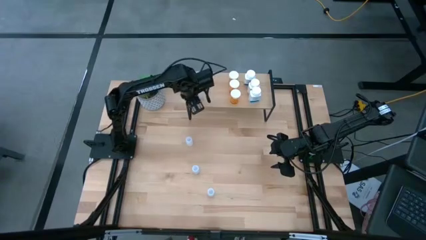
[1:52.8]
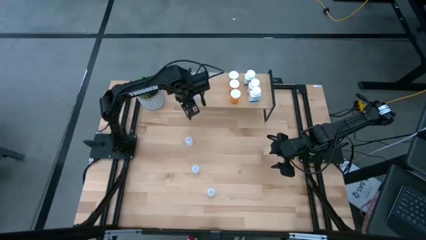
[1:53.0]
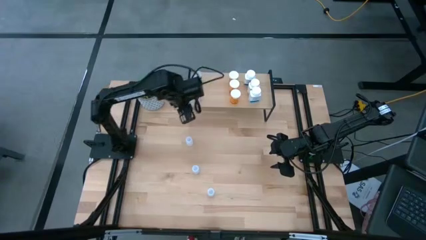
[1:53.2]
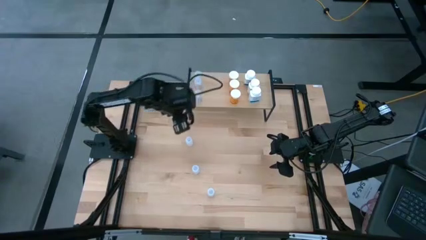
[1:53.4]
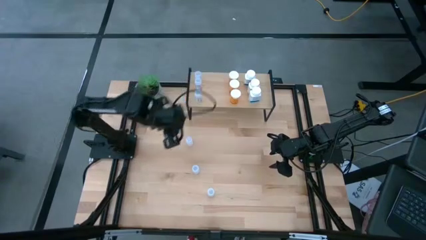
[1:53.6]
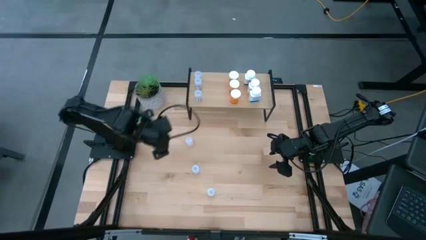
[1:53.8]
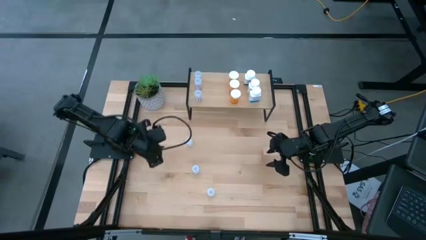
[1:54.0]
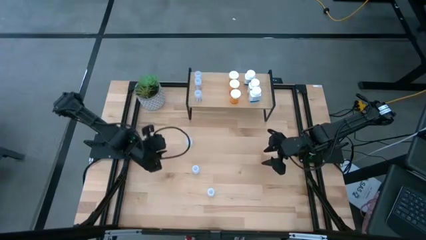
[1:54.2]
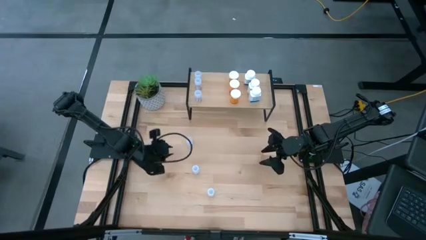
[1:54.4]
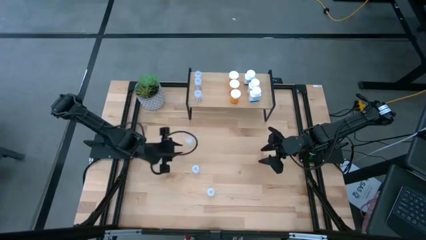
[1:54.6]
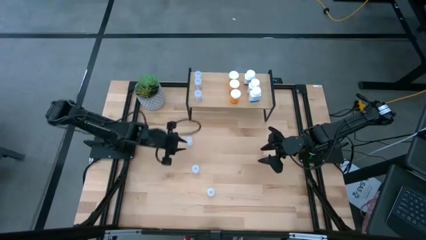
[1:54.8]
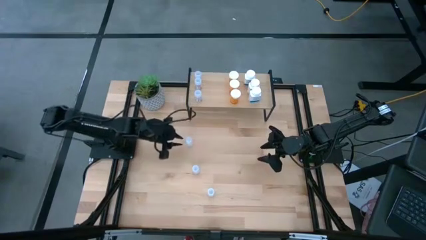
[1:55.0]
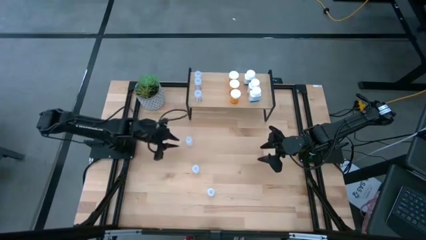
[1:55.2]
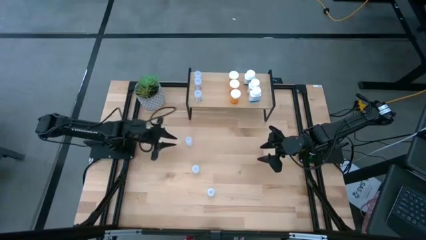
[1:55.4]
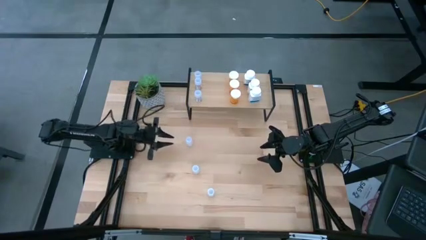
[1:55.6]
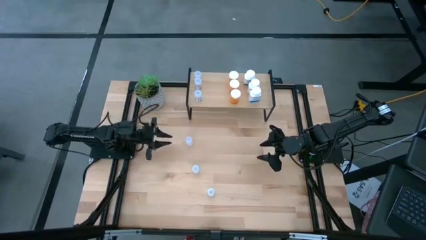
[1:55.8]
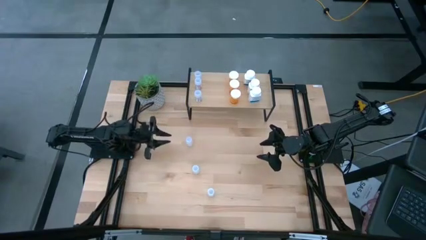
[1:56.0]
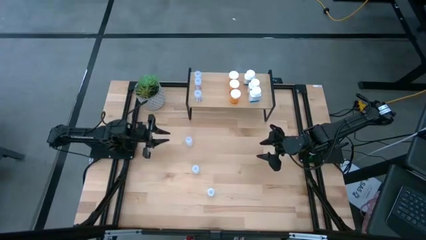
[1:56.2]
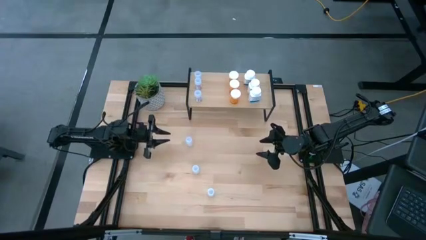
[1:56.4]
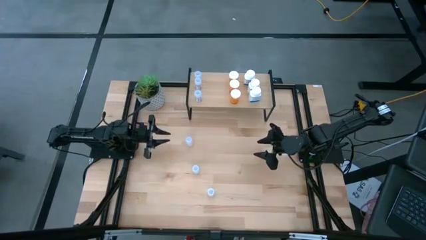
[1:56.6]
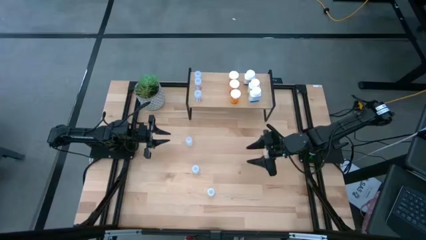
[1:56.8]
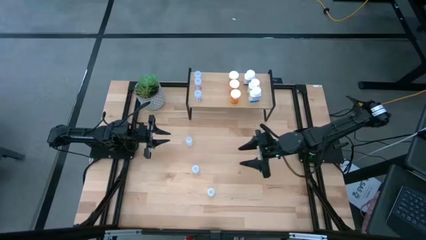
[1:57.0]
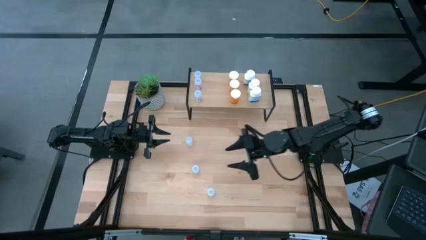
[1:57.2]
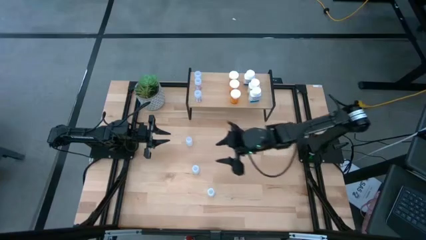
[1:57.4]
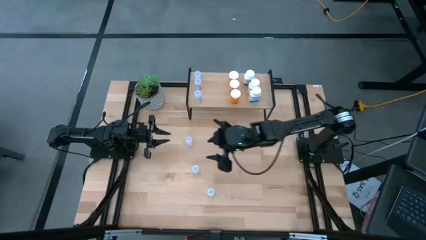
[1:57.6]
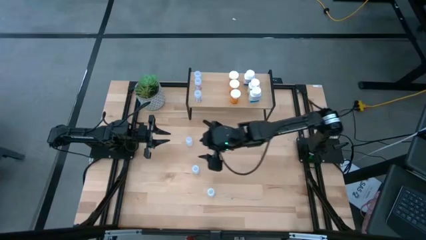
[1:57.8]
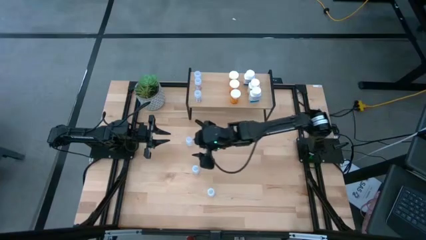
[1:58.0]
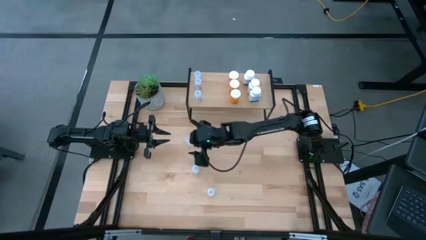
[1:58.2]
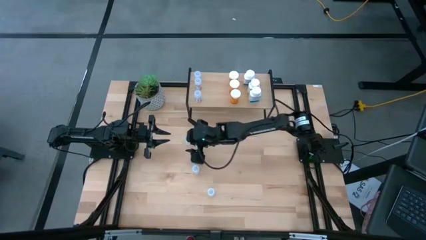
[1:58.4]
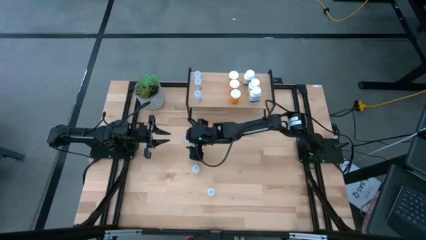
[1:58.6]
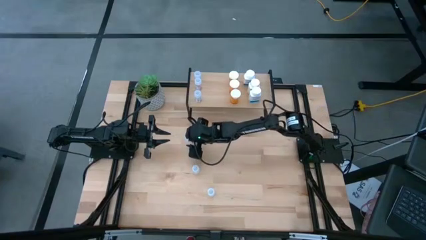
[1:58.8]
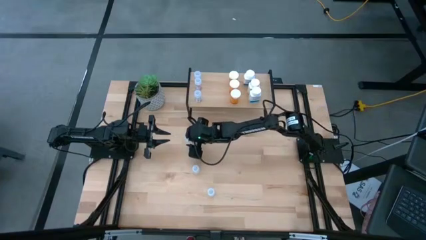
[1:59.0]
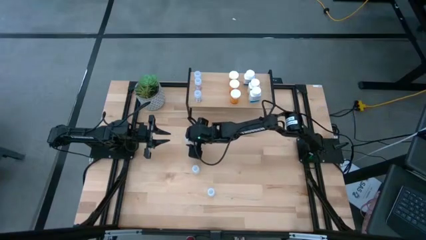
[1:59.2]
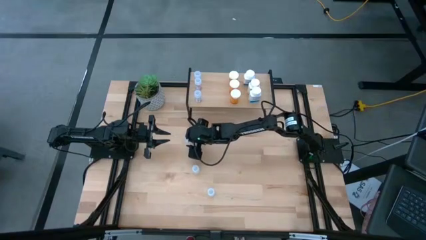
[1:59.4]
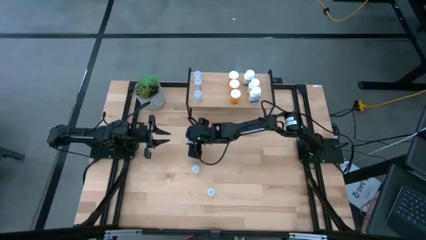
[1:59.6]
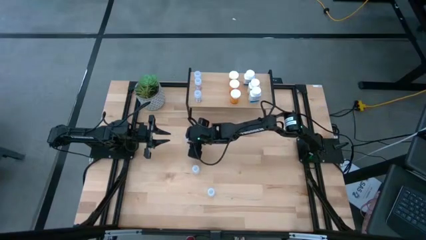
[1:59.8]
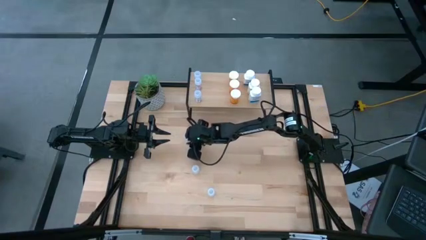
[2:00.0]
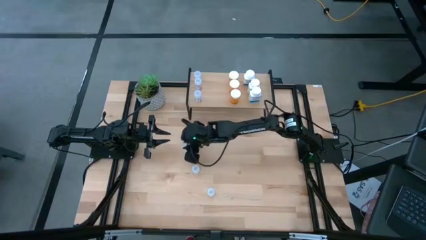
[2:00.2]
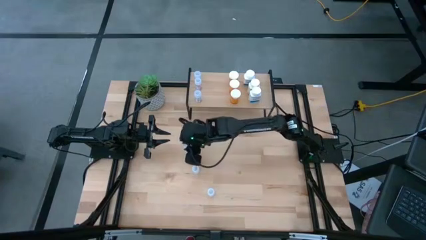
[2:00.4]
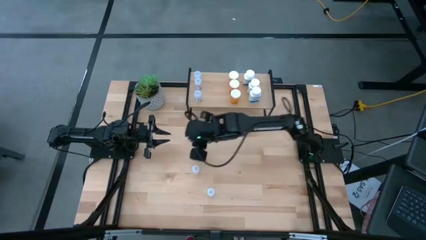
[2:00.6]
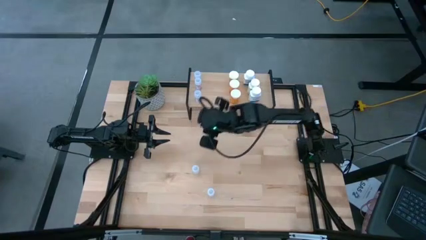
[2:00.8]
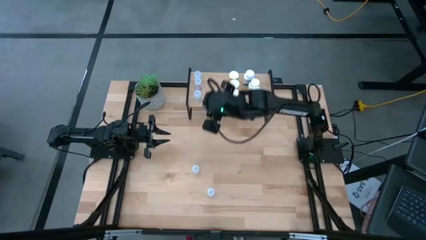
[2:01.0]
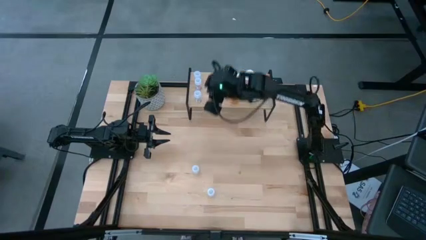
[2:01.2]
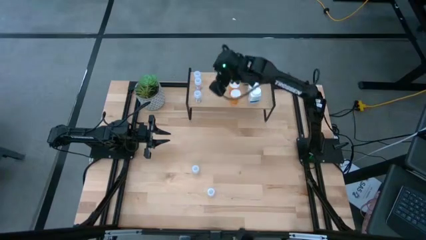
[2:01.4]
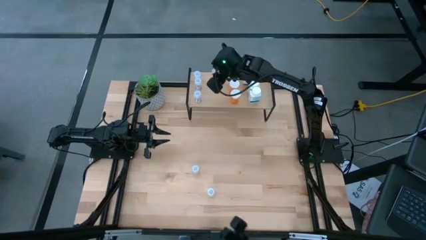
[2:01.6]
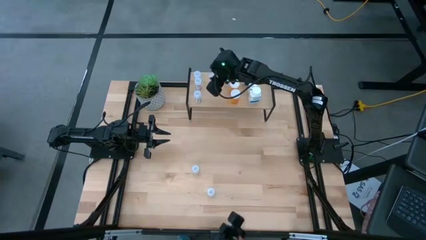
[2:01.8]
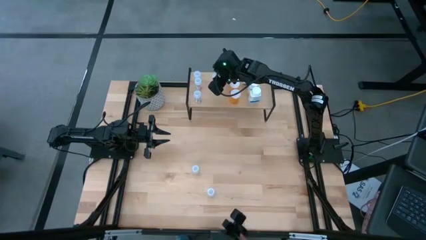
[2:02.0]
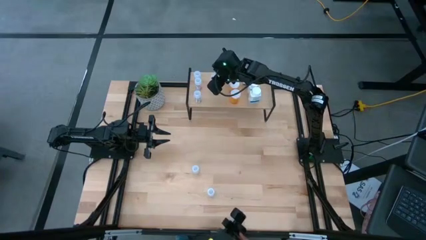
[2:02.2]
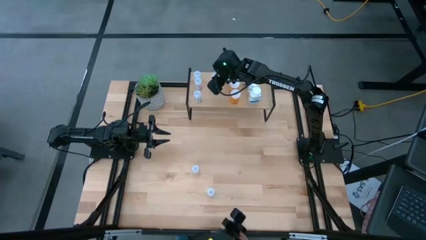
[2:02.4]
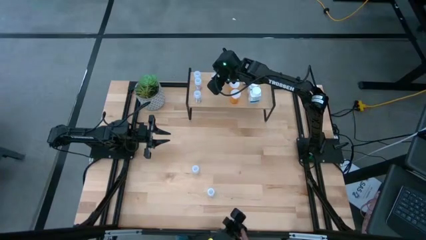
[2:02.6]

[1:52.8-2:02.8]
Task: Pick and place medicine bottles onto shelf by color
Put the top white pill bottle on the shelf

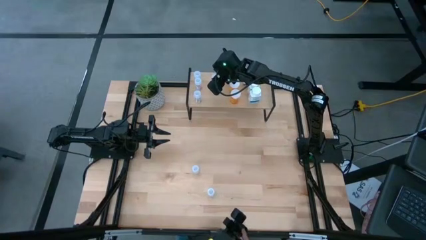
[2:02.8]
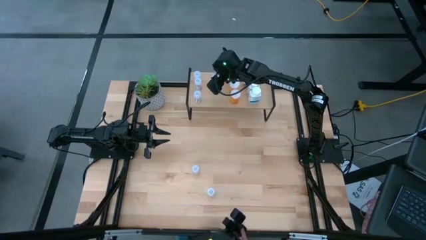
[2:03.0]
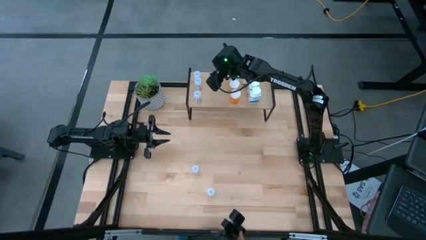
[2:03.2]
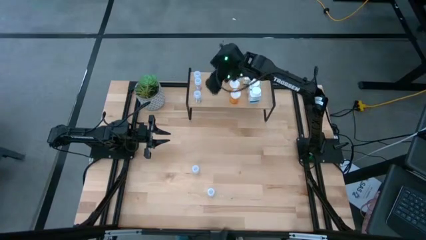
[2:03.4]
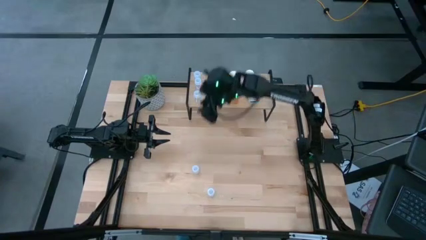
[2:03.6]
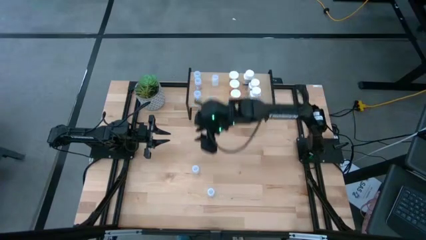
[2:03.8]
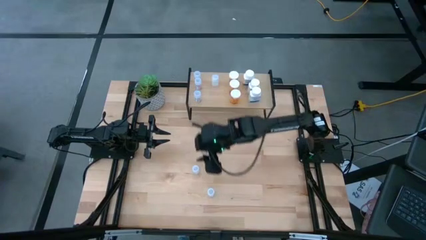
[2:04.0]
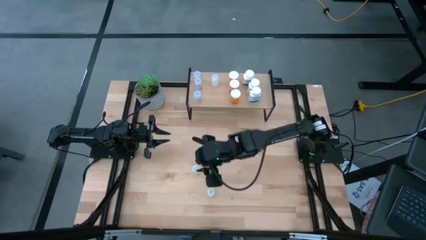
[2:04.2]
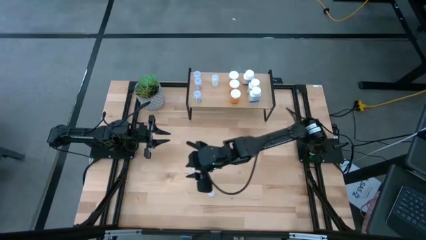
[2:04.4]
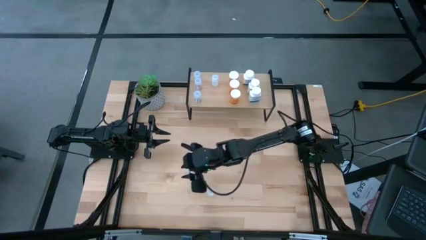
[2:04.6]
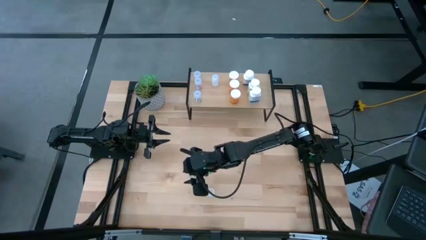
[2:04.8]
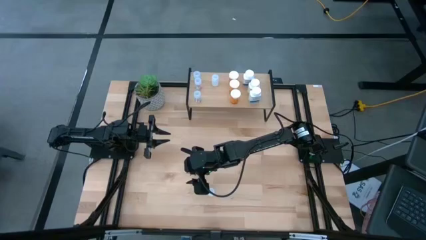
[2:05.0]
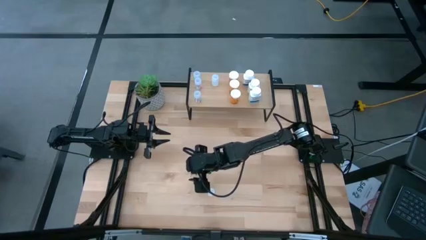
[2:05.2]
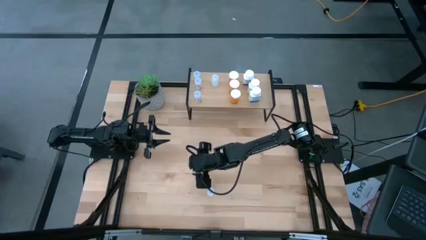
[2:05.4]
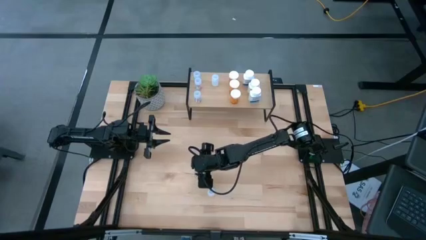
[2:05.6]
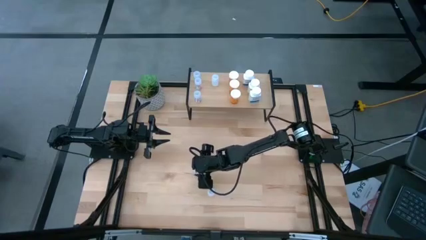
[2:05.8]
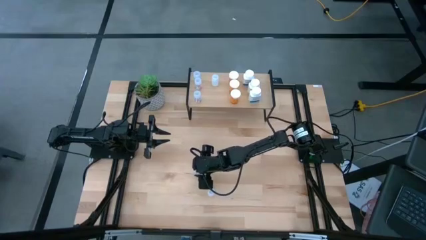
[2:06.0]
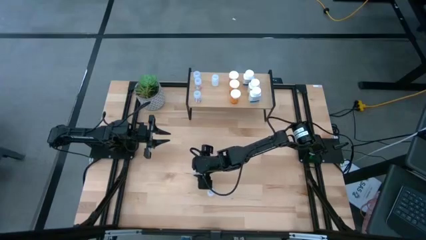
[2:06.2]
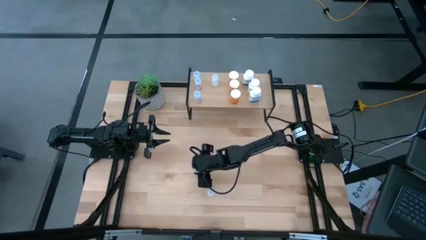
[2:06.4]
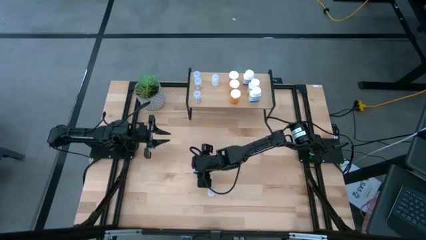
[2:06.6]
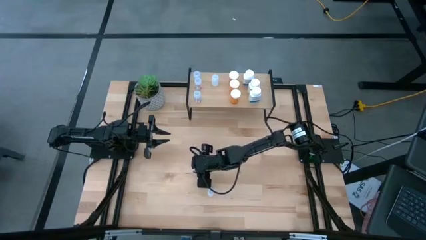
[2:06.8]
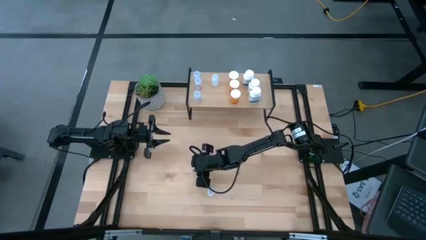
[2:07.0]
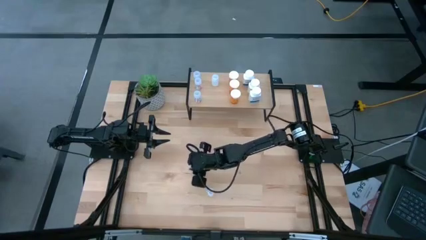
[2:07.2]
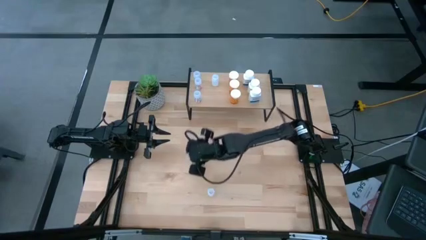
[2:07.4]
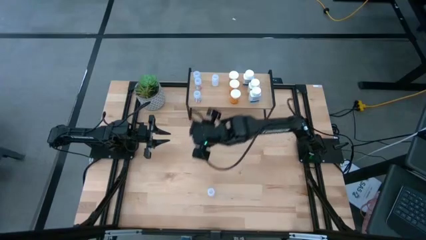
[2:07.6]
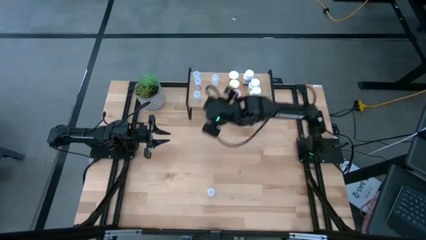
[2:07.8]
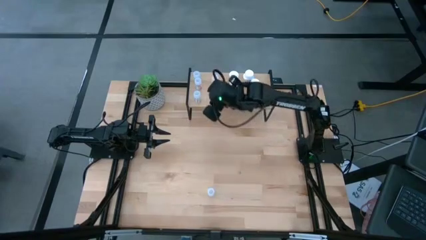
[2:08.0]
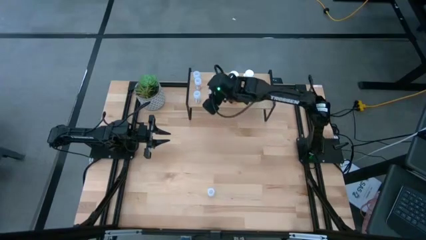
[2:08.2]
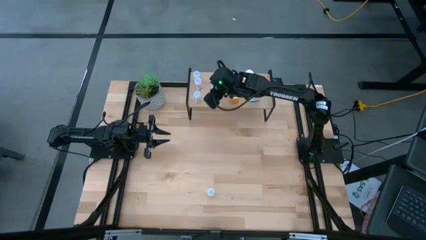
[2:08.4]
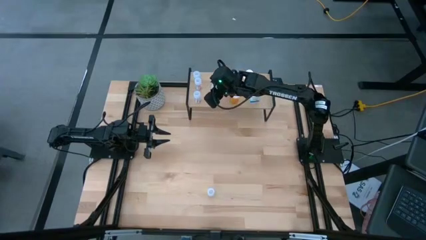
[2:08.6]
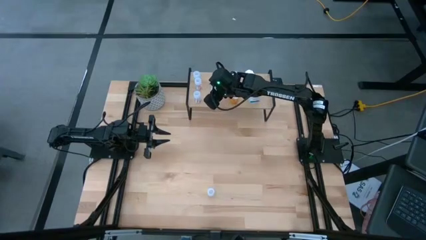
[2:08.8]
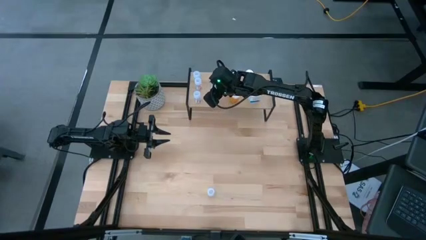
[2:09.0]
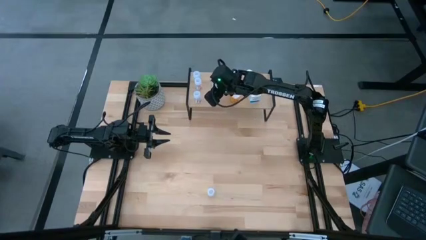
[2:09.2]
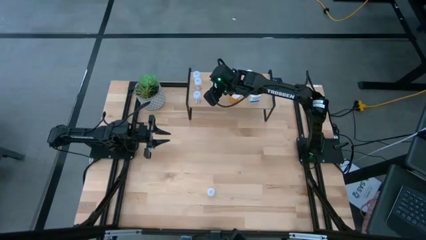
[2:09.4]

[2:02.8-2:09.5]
Put the top white pill bottle on the shelf aligned with the other white pill bottle

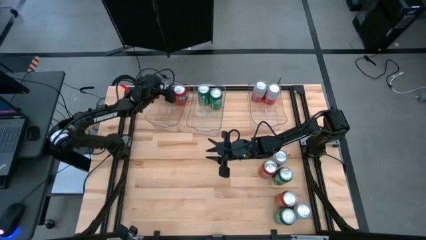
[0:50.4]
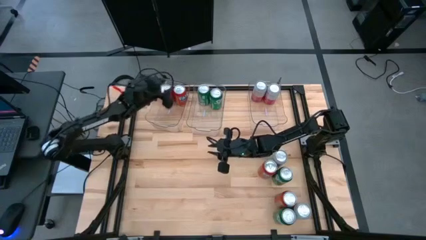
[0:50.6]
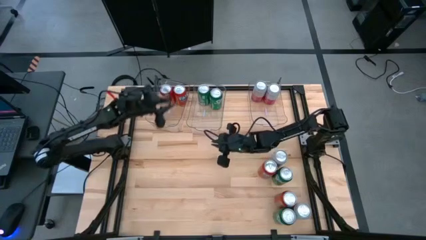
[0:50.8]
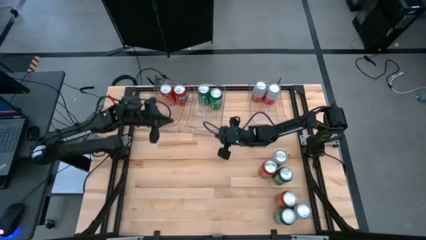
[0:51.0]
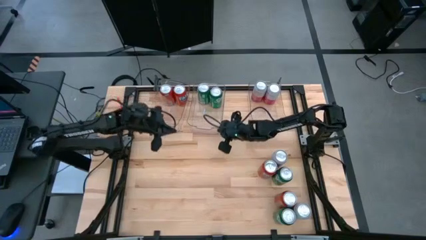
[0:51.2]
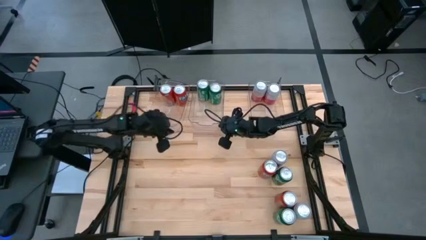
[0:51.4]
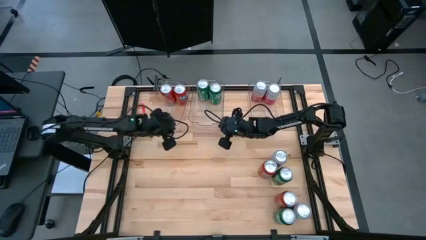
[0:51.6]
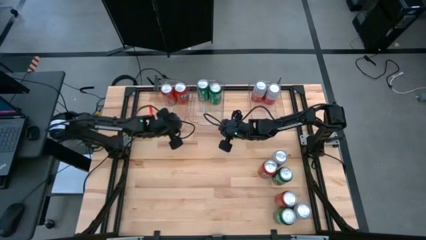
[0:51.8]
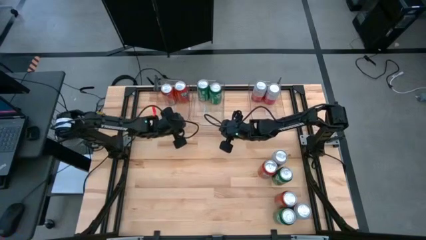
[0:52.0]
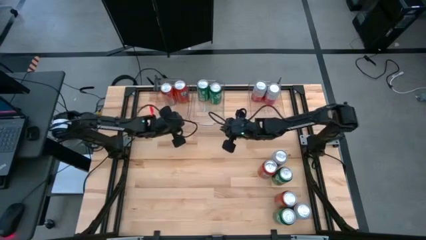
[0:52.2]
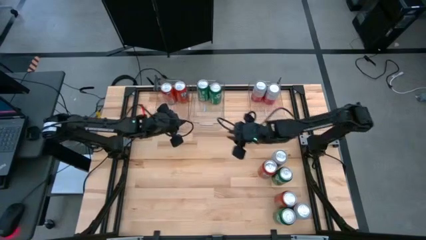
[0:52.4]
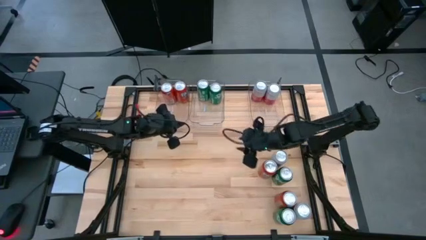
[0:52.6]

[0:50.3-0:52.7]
Task: Sort soda cans
Adjust the left and center transparent bins
